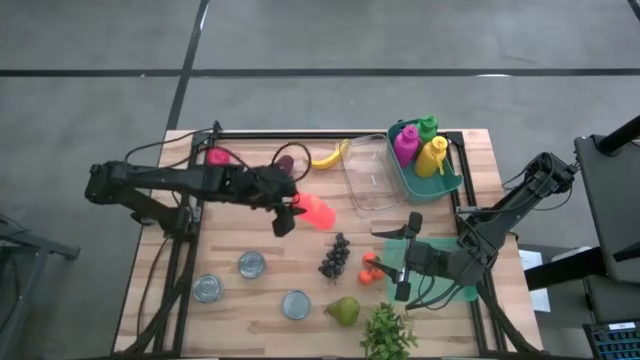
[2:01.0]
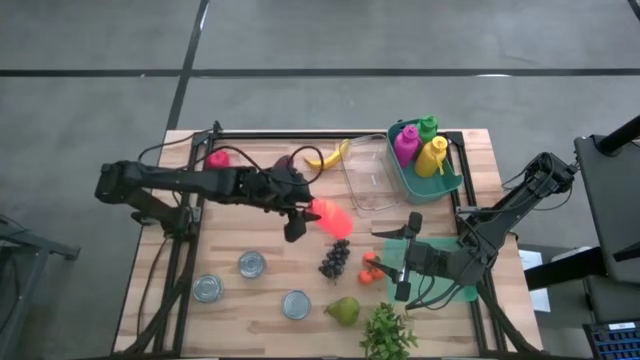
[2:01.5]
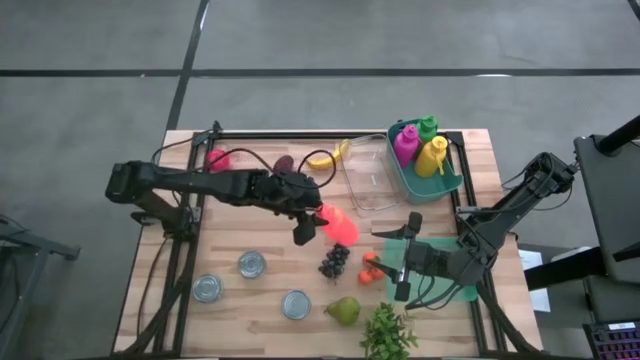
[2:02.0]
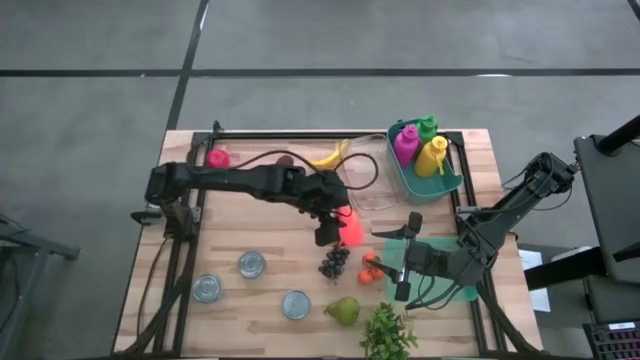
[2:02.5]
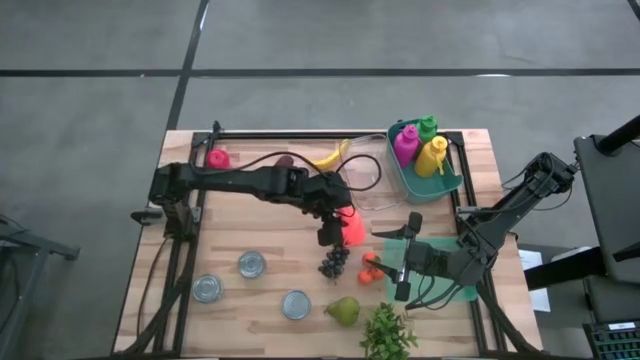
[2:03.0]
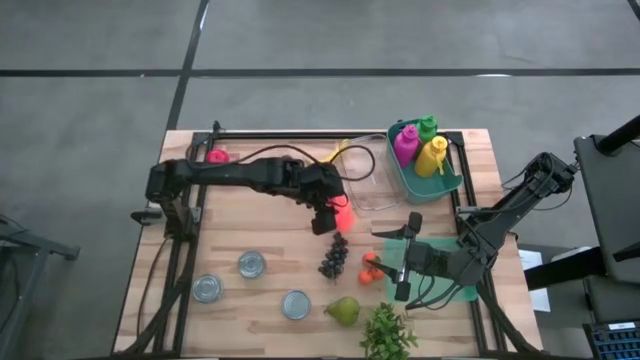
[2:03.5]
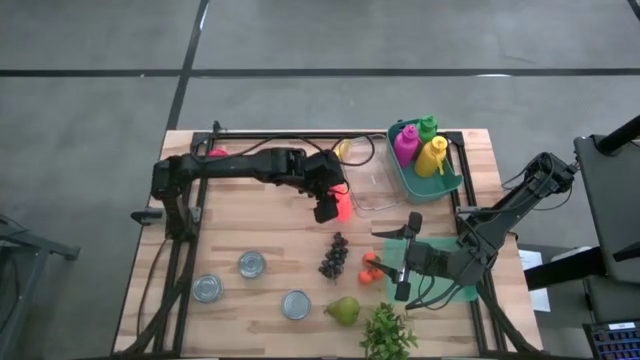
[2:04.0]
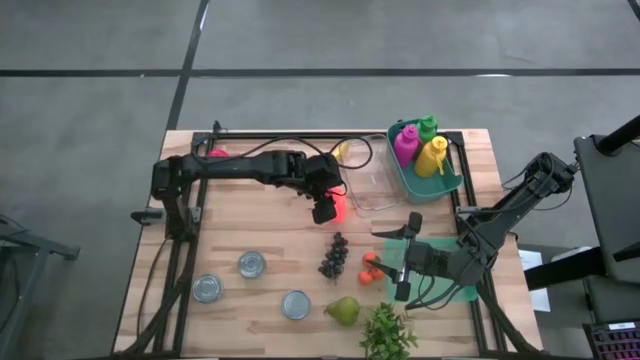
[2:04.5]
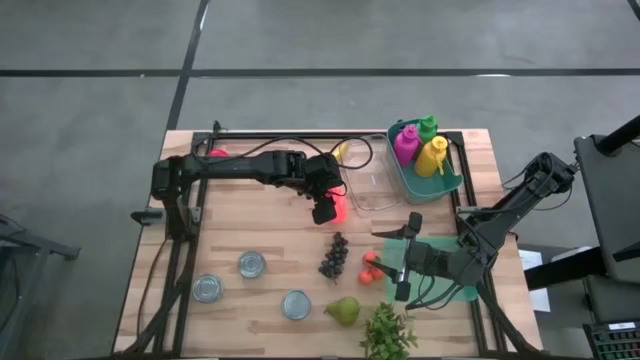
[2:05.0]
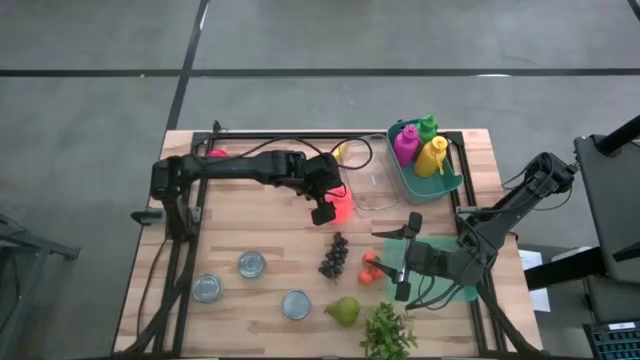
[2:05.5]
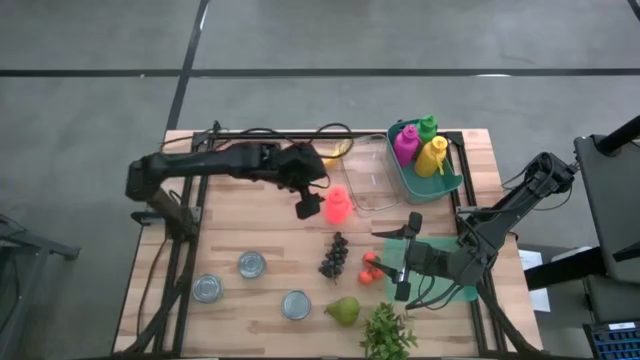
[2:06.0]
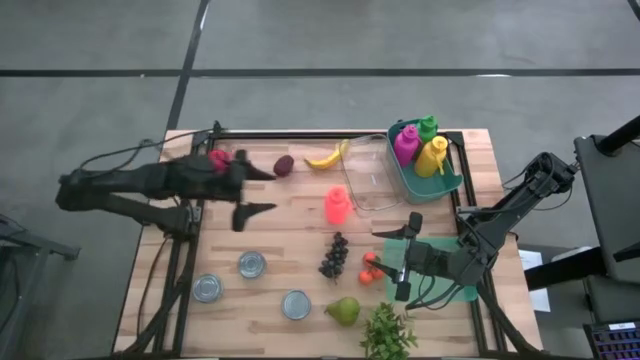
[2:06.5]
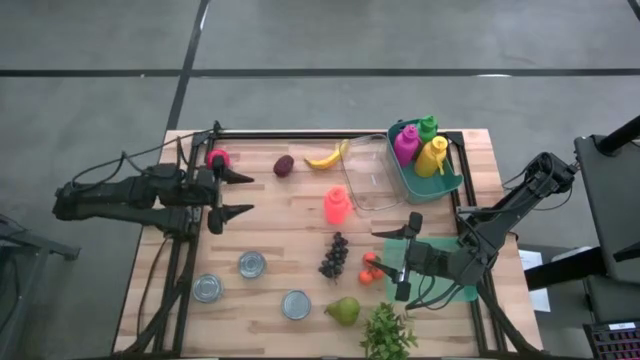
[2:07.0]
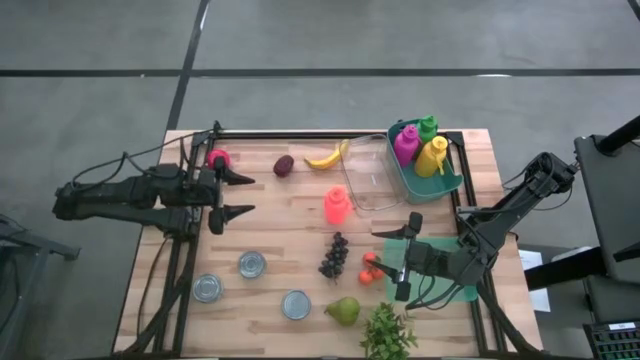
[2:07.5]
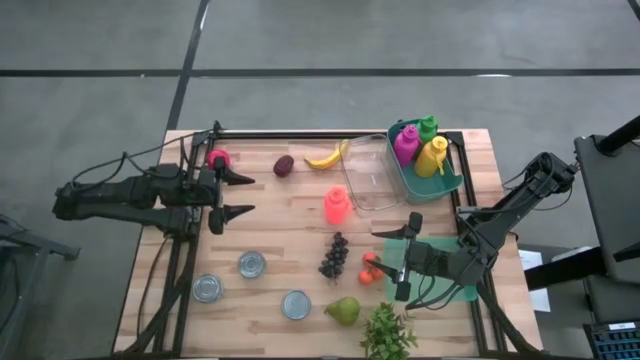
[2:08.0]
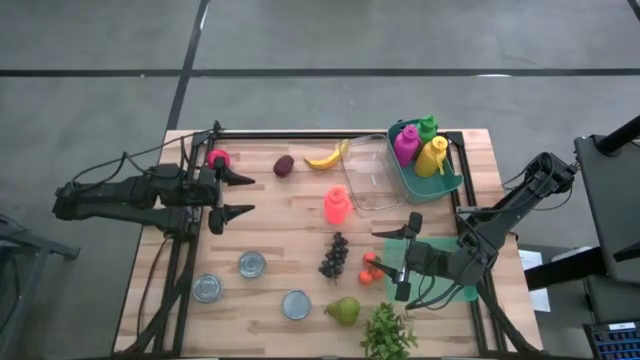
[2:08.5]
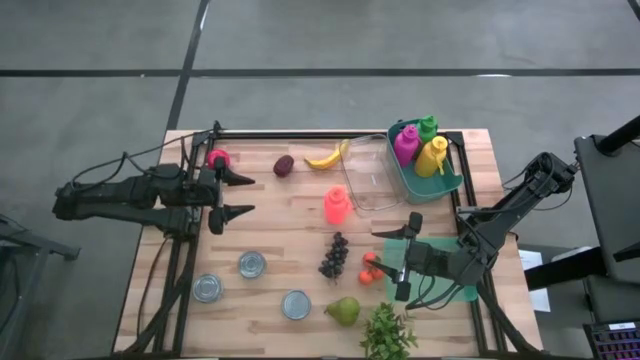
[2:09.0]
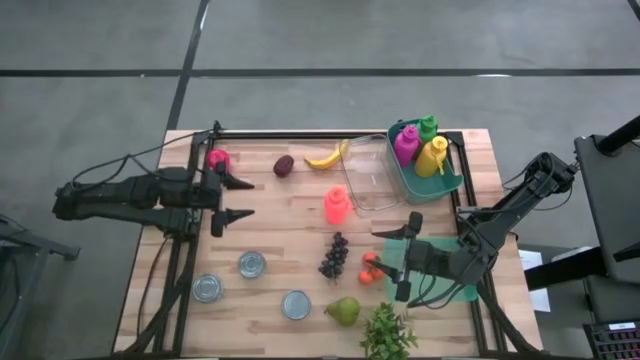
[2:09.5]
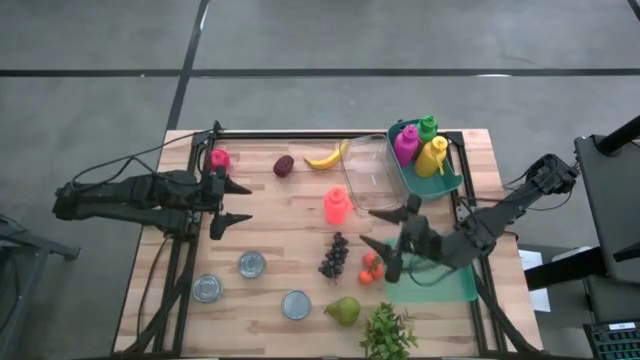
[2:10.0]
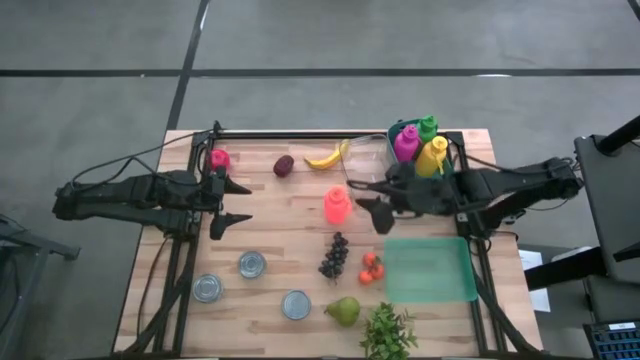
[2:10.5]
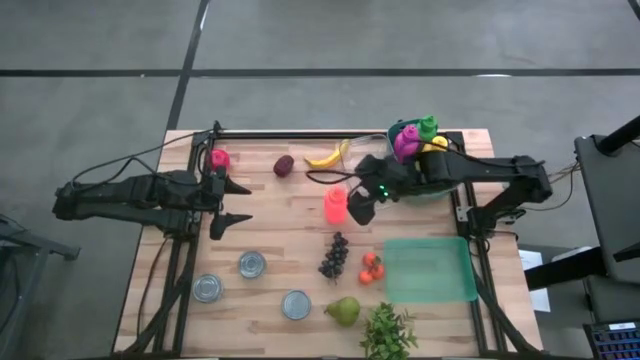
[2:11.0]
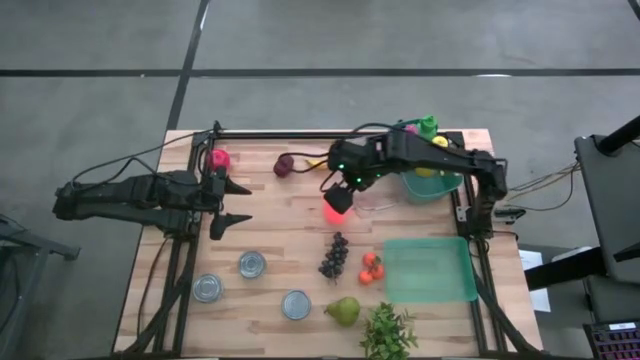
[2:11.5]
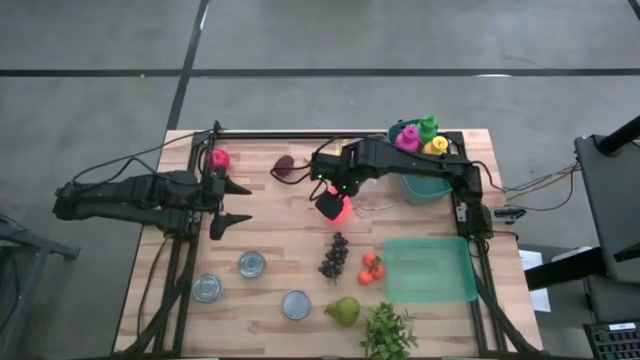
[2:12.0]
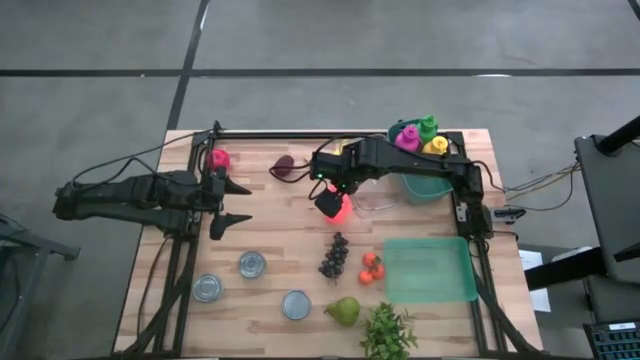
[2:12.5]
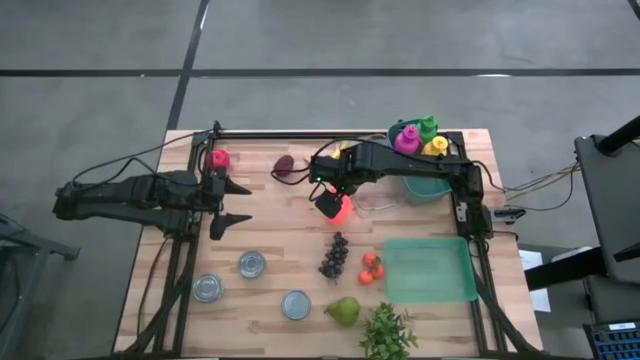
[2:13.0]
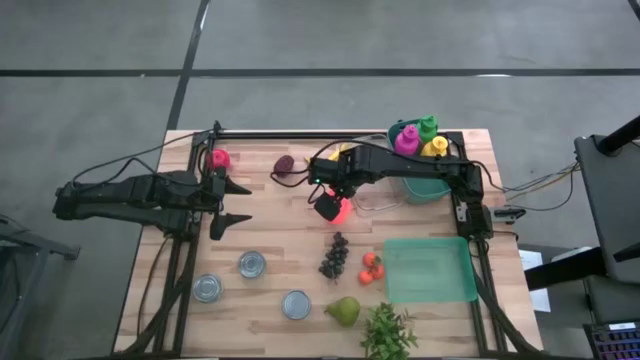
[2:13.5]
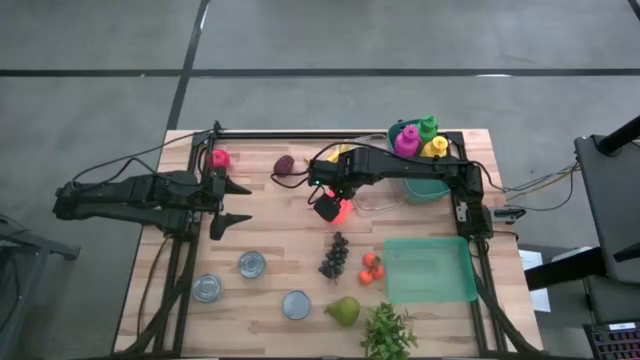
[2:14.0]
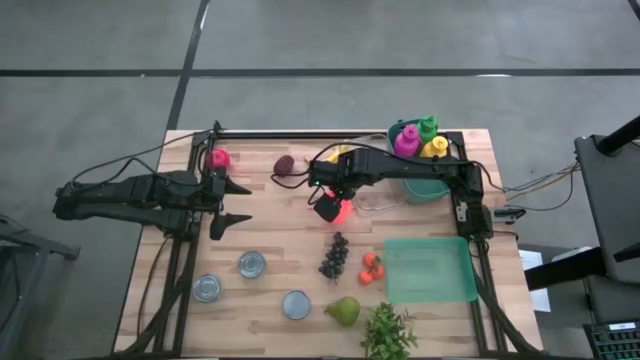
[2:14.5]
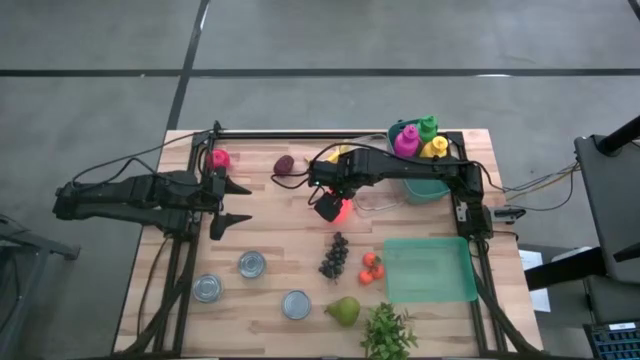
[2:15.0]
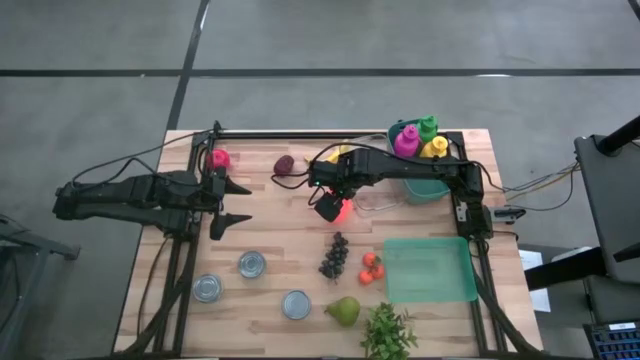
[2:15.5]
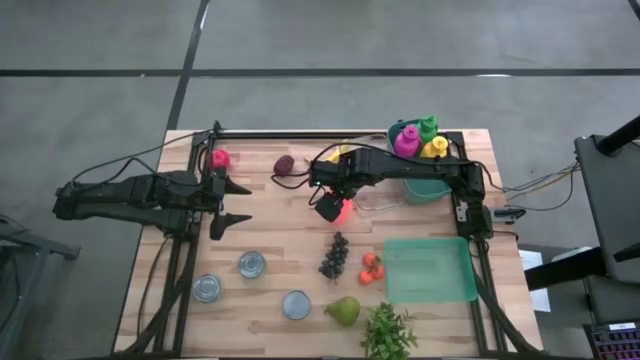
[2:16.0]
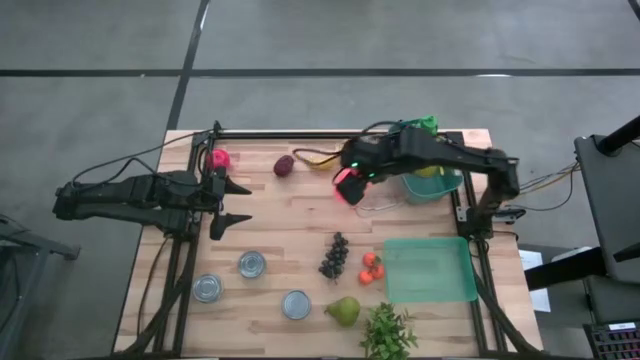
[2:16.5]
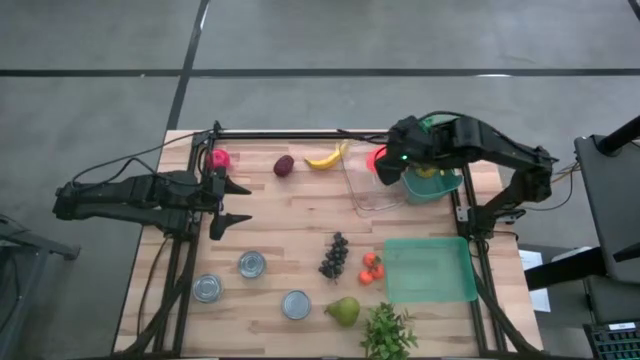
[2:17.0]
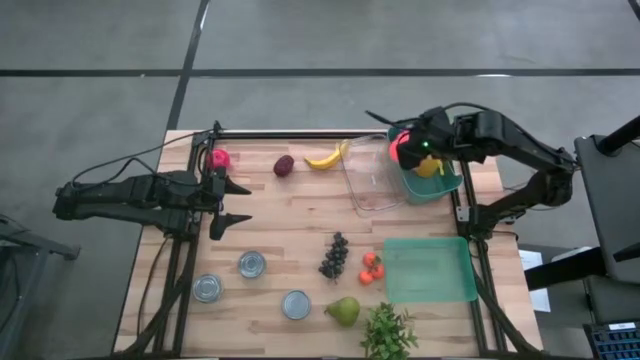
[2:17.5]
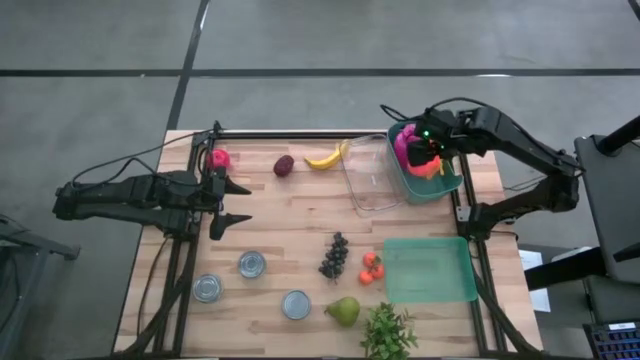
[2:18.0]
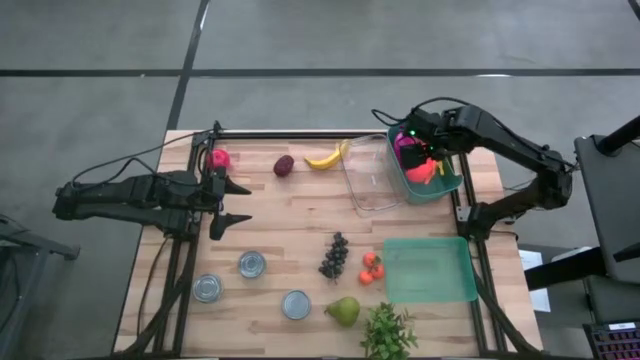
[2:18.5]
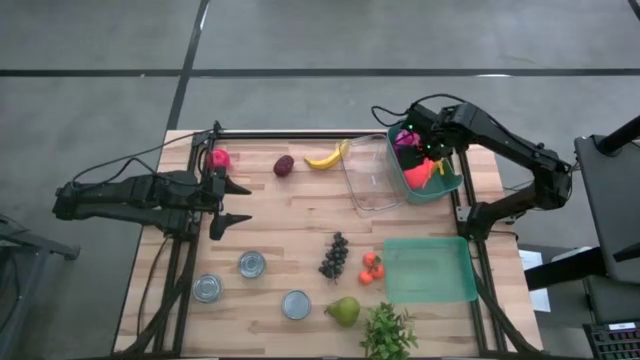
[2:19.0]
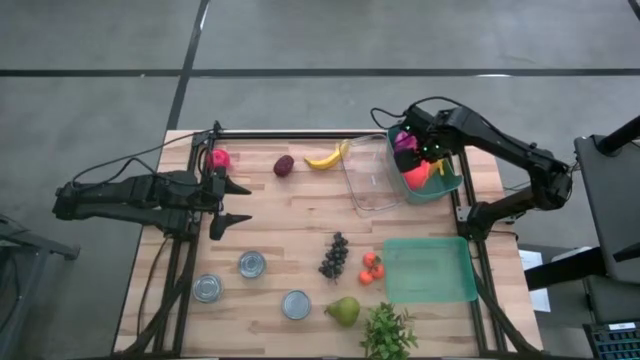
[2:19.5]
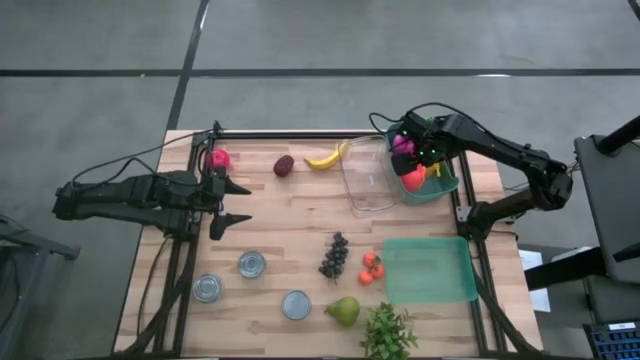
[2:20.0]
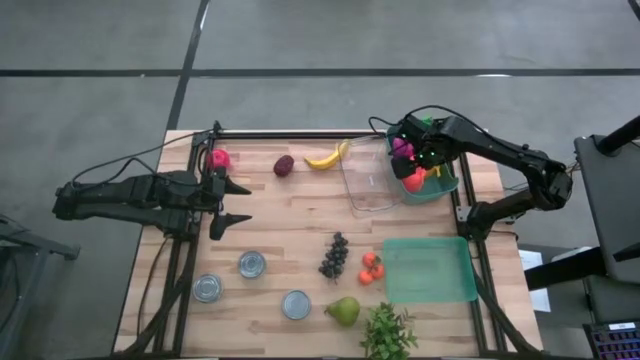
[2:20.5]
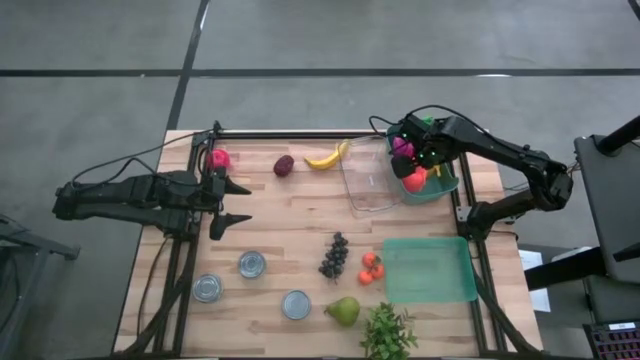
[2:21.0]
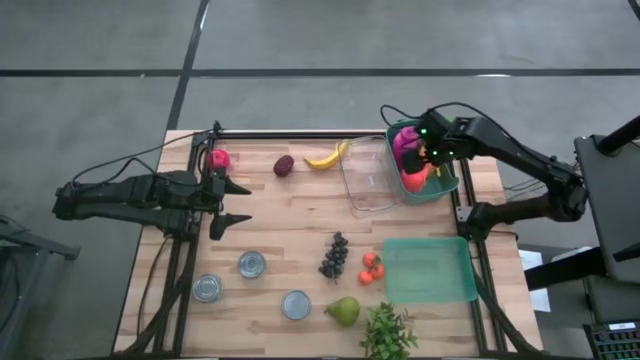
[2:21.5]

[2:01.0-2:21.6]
Task: Pick & Place Food Item
Put the orange water bottle into the green bin
